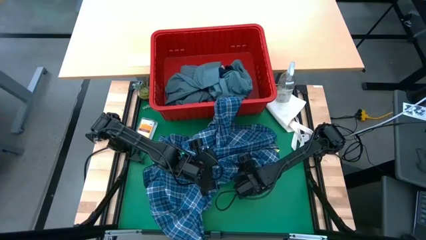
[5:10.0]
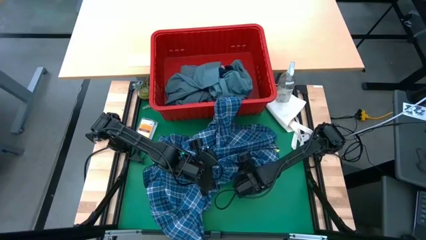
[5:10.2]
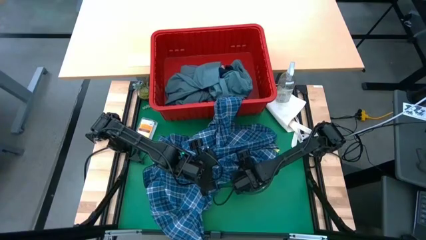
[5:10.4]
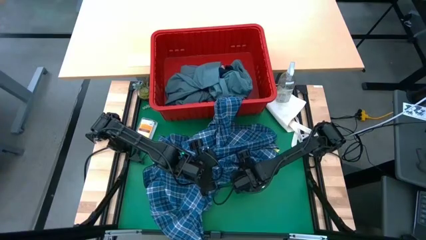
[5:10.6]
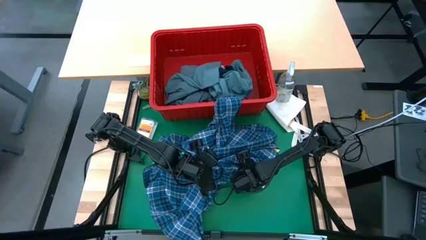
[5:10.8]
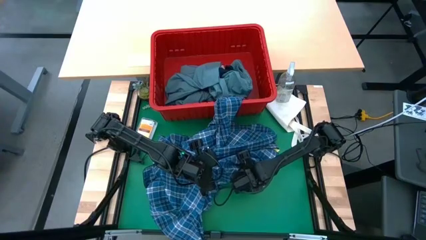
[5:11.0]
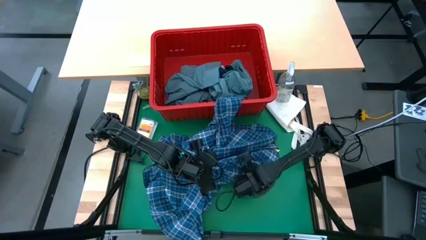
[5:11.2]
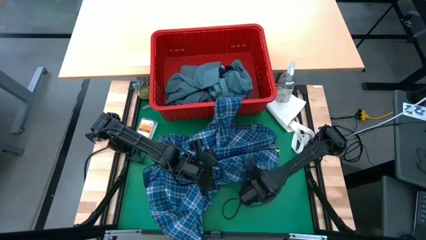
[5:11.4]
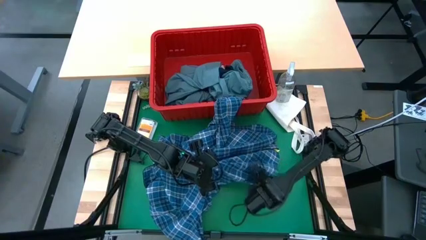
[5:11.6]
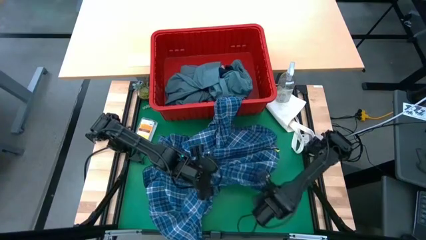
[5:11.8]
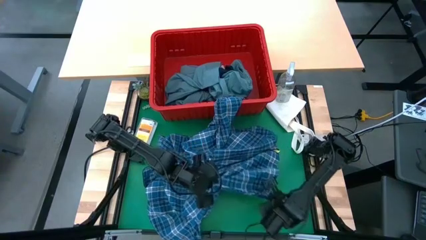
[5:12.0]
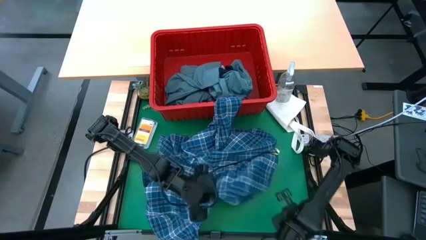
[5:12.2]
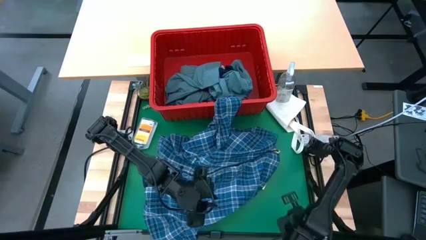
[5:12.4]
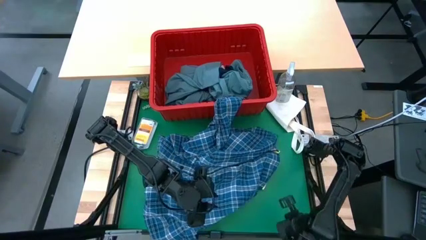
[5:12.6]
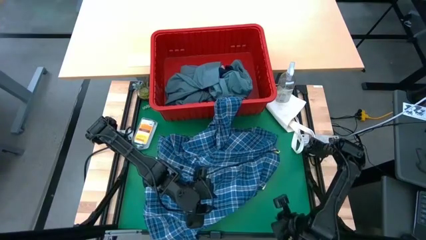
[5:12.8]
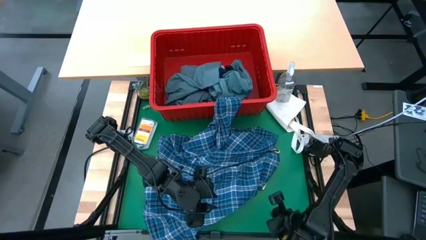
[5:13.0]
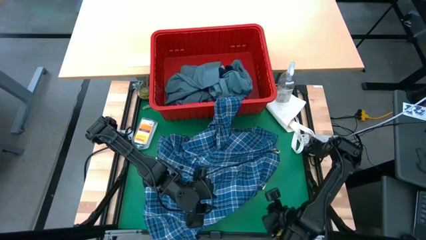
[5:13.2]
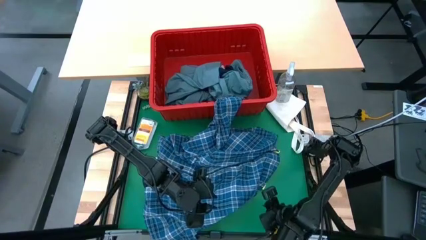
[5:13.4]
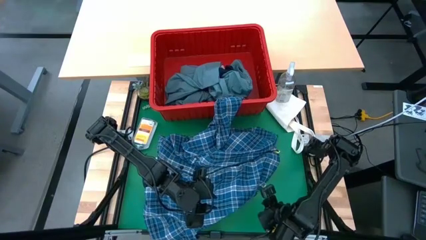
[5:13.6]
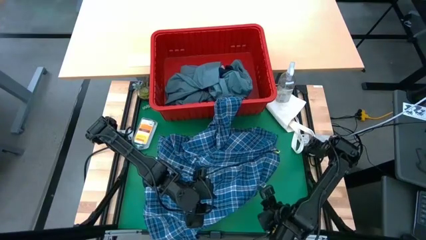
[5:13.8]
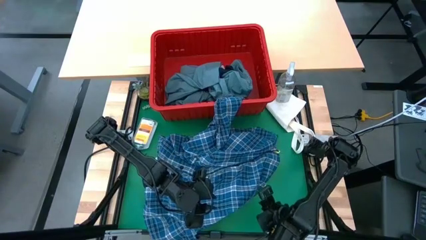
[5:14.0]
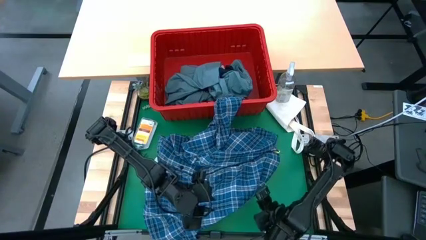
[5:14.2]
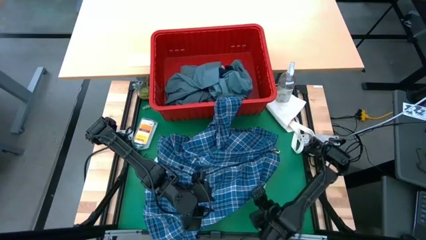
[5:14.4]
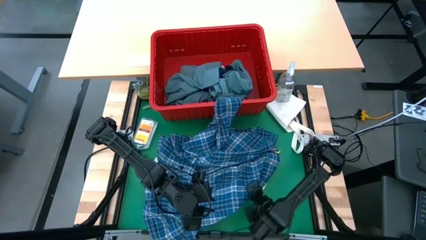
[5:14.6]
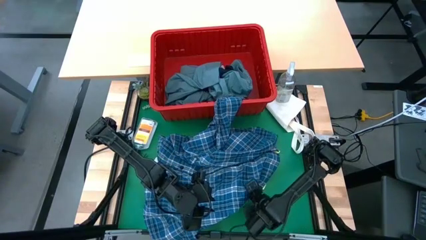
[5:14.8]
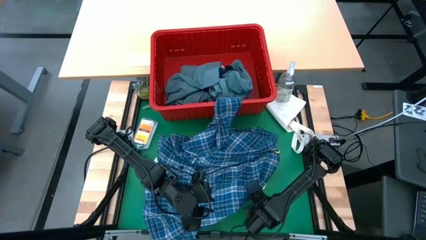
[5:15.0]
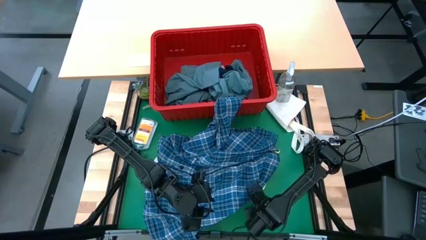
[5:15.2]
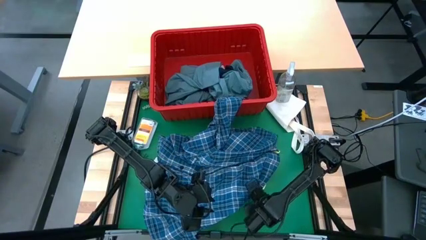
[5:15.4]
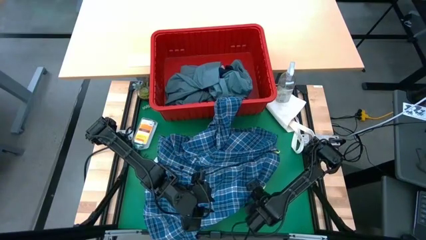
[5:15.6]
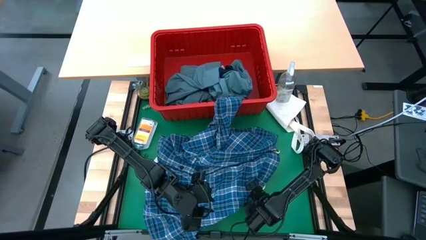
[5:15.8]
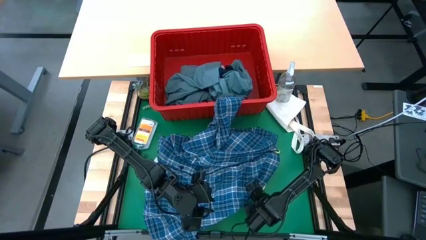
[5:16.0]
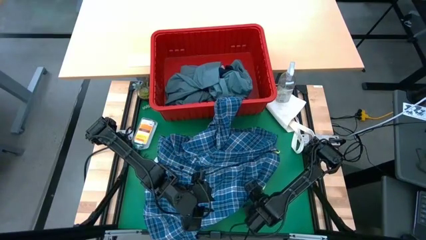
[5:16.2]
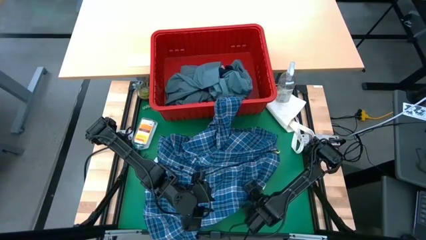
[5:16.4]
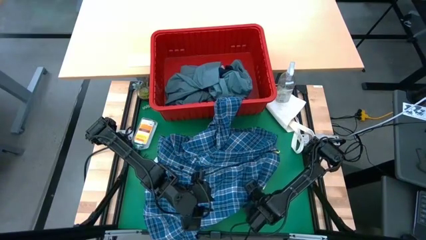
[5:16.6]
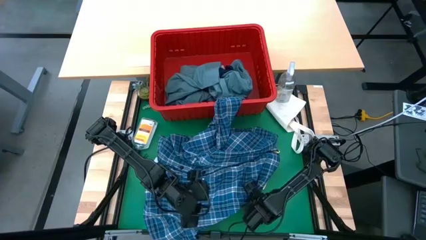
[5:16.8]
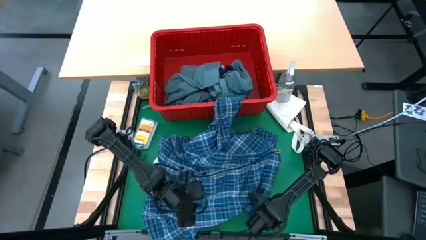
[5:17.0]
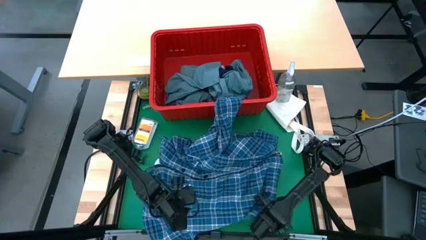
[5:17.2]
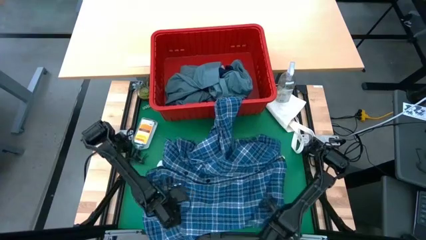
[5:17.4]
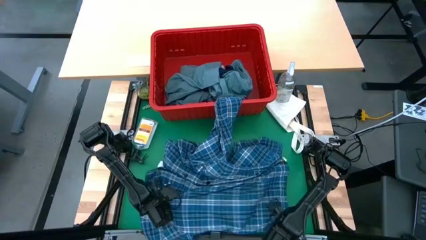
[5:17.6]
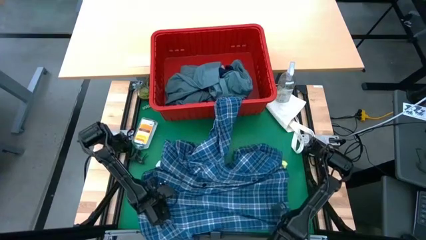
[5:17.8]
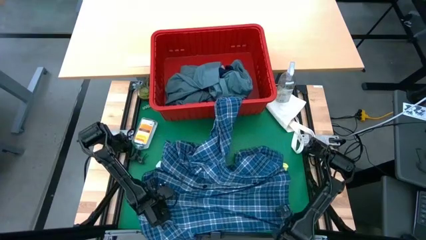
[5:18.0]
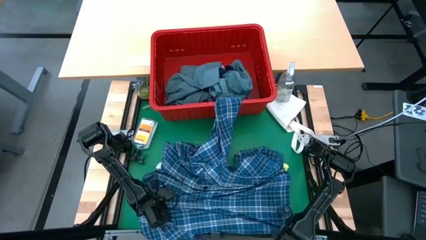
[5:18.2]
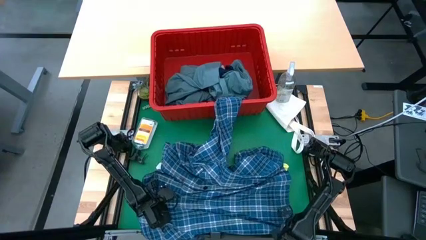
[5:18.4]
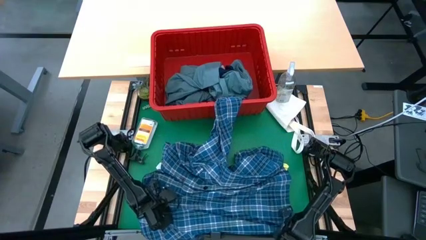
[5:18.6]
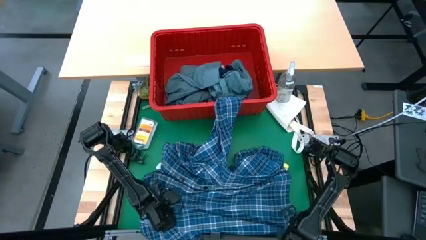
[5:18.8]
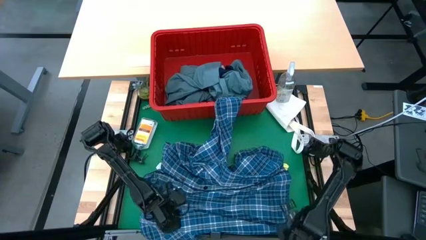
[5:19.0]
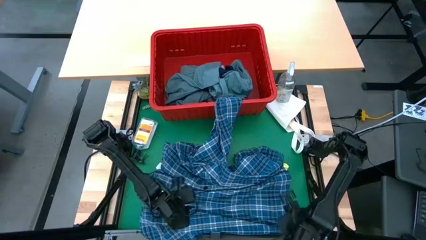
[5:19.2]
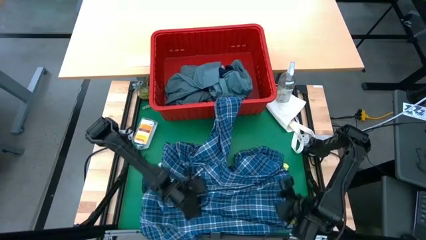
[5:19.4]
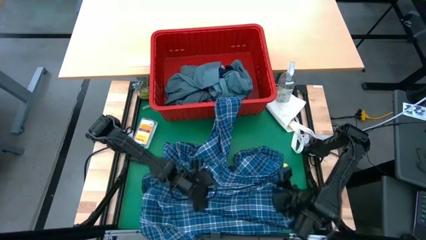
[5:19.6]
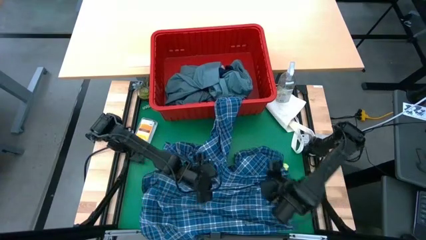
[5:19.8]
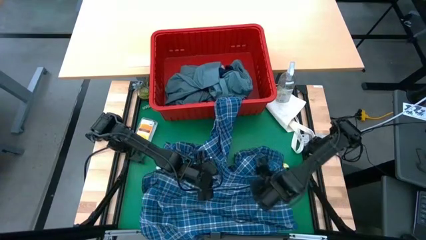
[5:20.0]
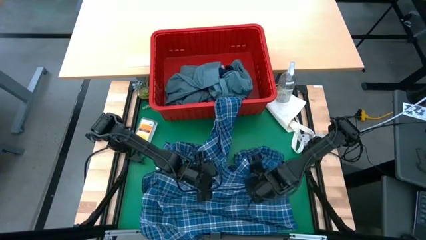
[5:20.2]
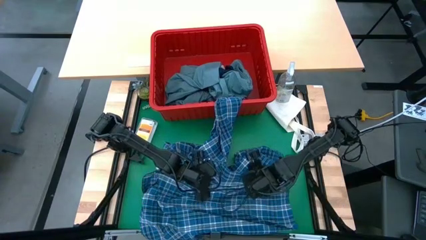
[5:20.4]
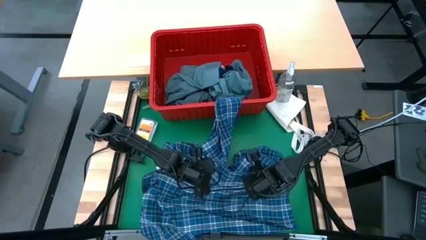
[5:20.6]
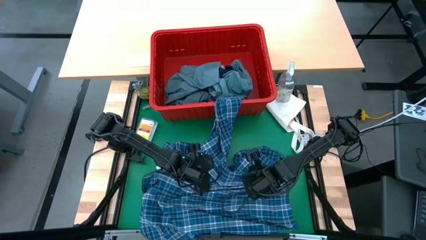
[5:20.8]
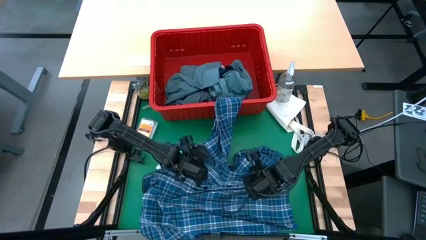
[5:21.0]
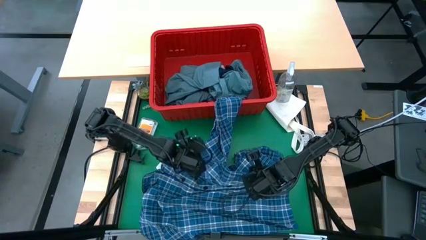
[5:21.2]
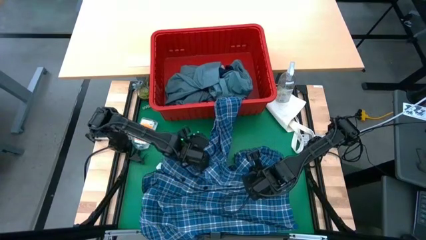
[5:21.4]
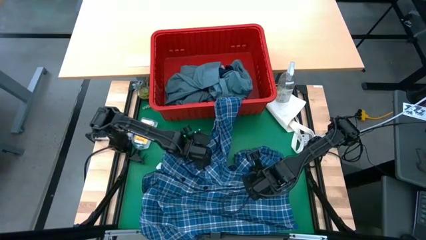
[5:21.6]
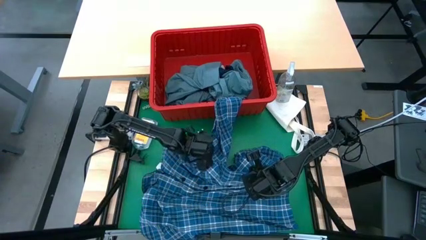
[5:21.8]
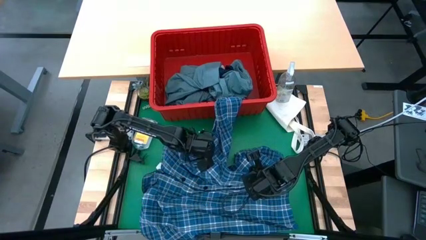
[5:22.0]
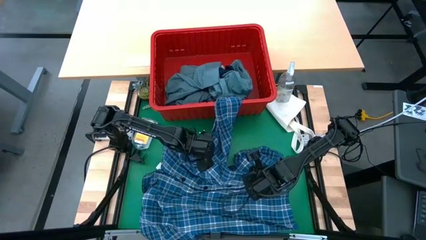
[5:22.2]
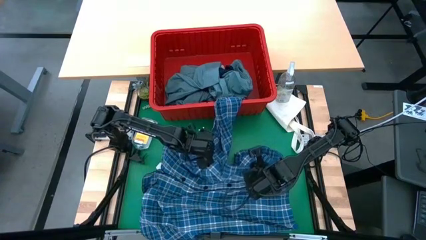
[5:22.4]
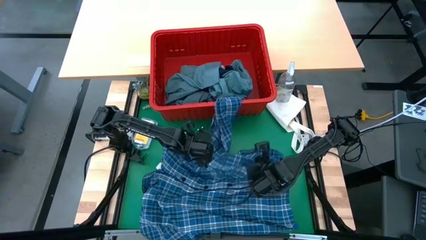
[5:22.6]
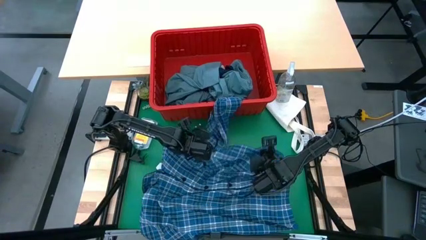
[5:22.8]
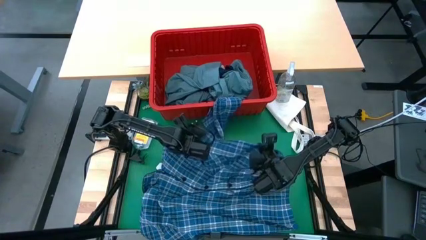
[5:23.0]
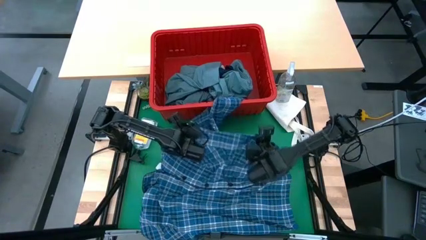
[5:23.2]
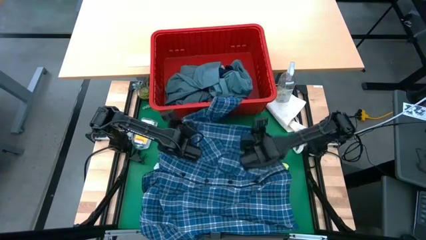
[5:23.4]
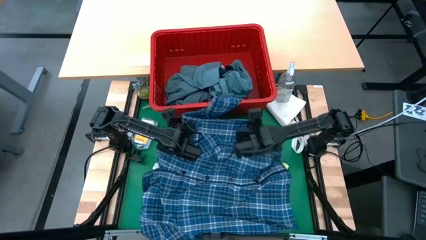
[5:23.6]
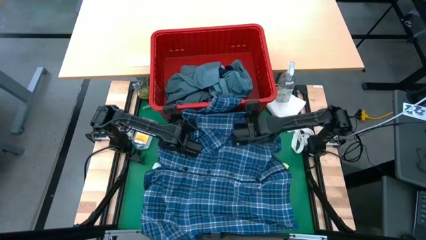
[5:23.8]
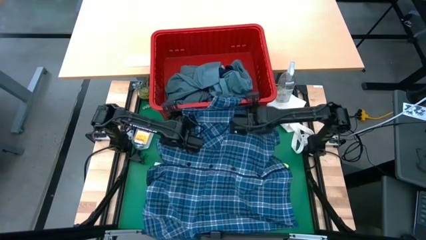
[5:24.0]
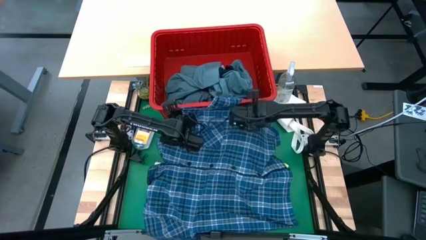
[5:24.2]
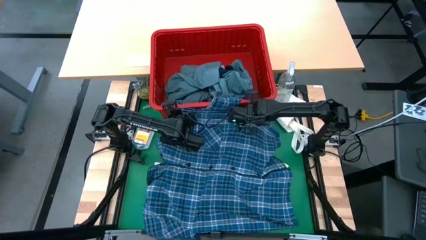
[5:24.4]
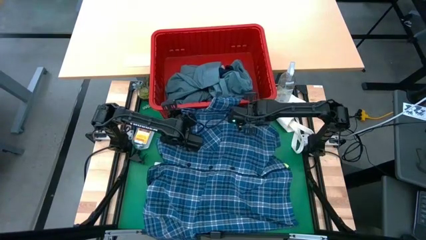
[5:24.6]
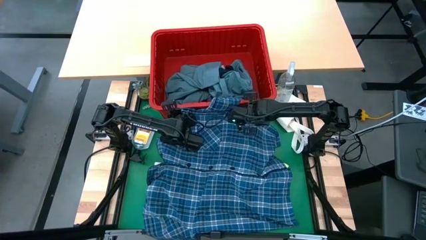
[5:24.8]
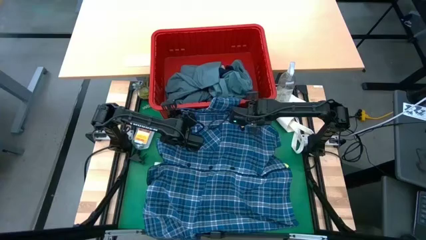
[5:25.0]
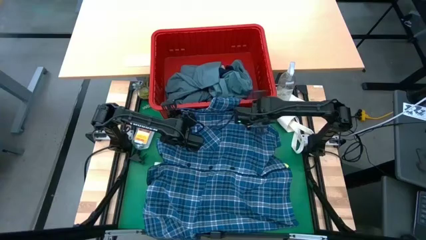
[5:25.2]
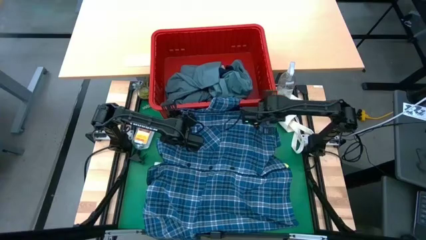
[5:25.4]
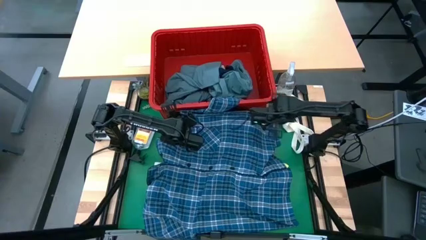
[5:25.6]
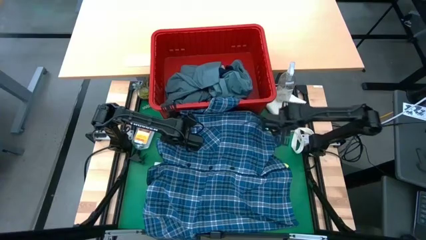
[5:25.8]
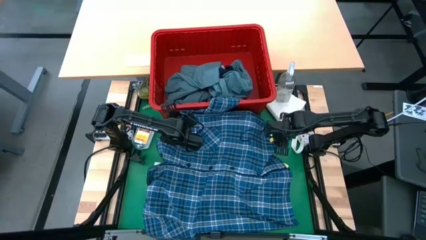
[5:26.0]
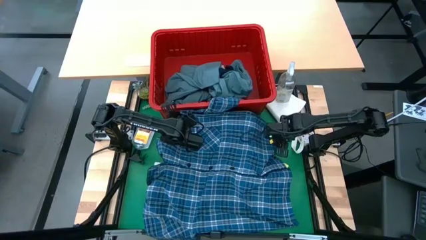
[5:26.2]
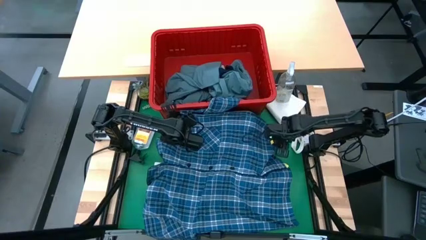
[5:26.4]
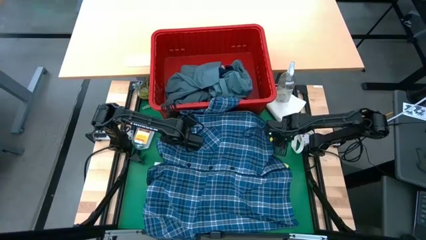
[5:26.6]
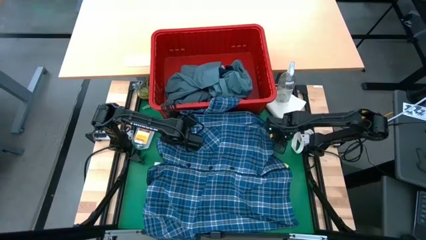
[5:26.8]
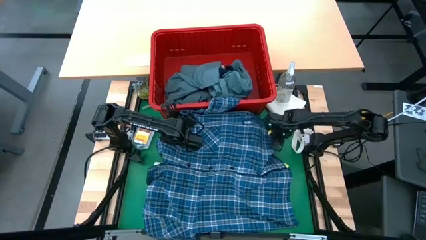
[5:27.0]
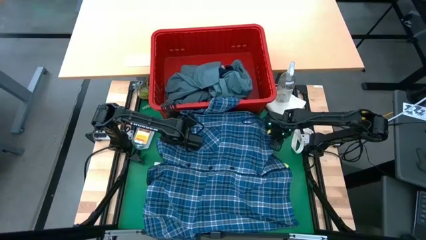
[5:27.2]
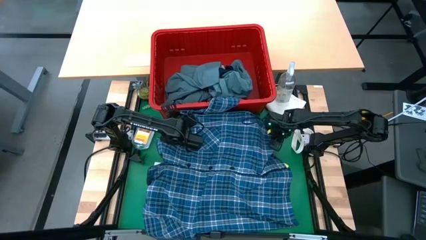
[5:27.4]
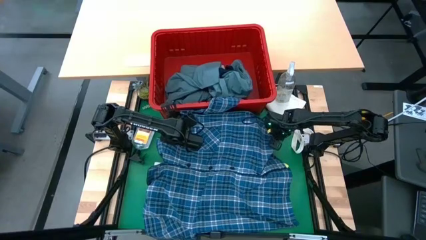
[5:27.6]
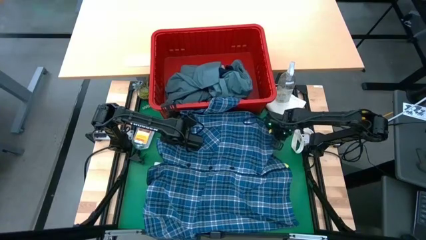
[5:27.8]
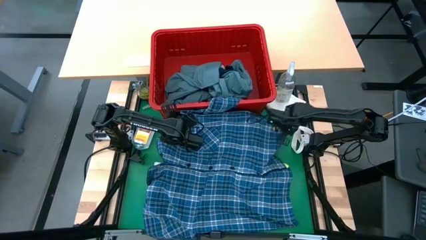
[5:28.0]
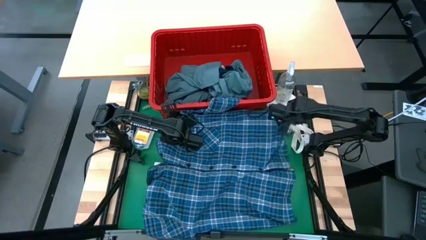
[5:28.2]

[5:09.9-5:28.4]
Task: Fold Laundry from Bin
Fold the blue shirt
